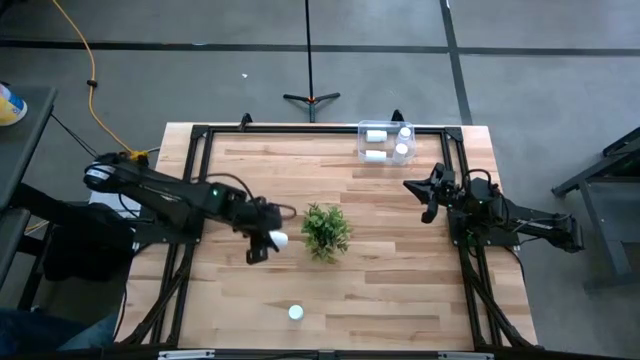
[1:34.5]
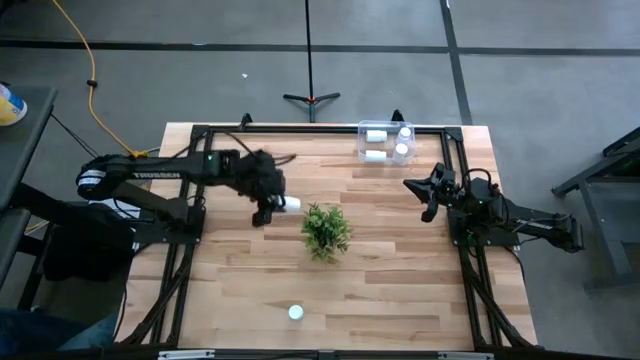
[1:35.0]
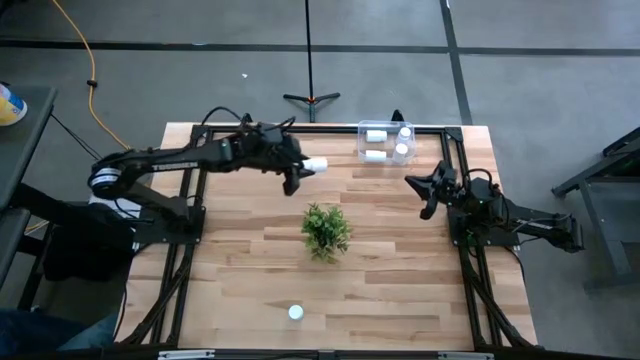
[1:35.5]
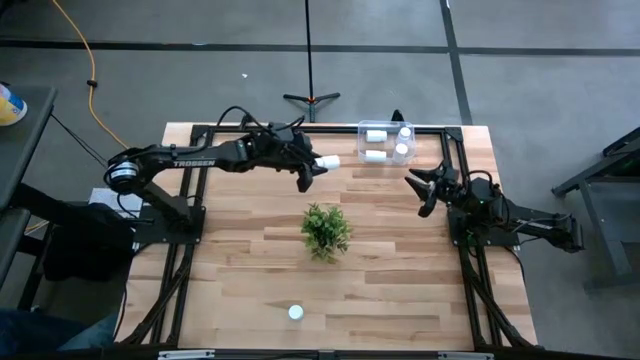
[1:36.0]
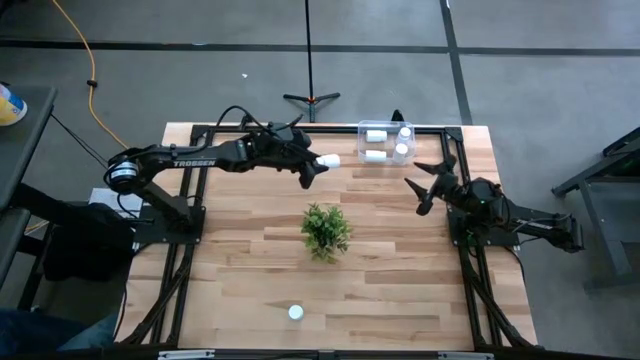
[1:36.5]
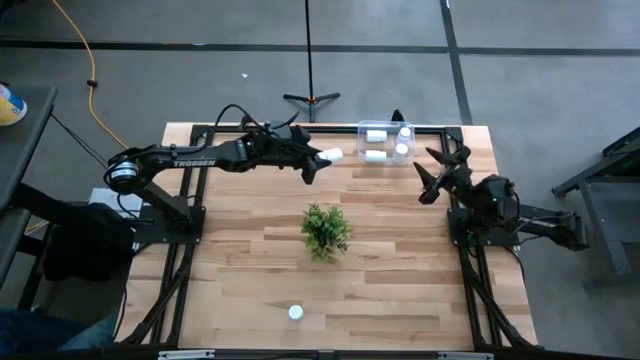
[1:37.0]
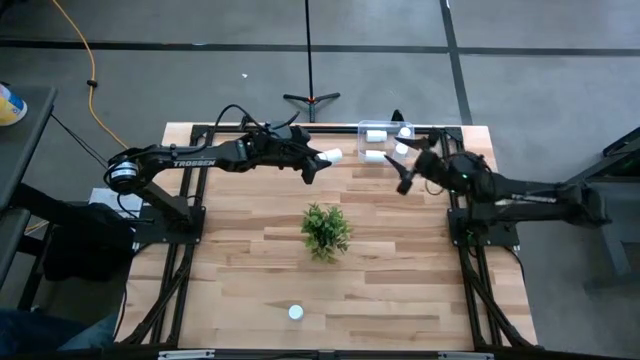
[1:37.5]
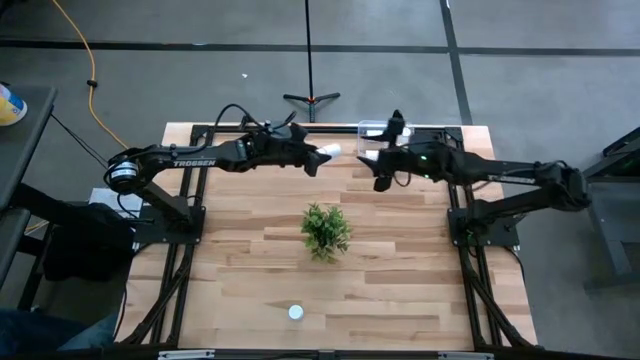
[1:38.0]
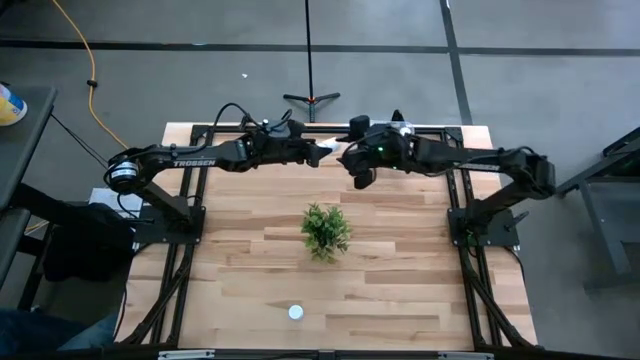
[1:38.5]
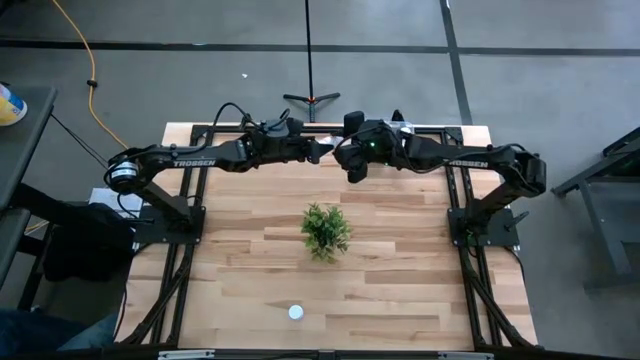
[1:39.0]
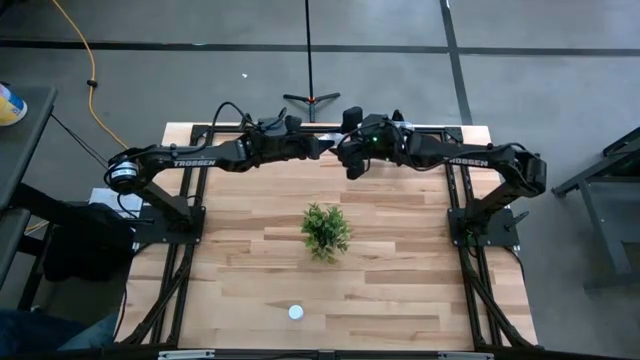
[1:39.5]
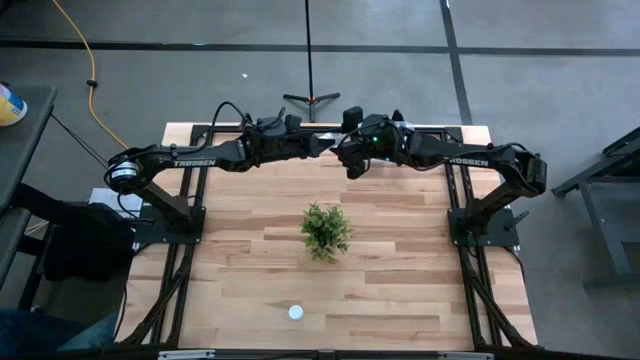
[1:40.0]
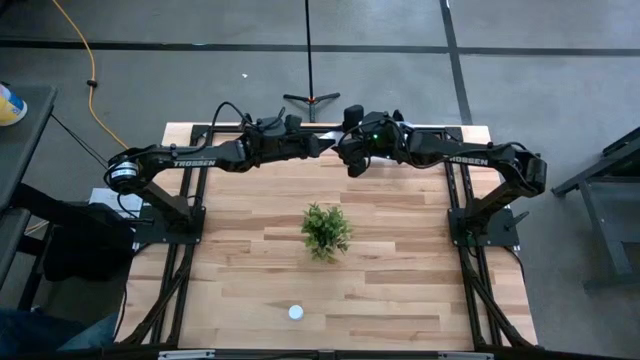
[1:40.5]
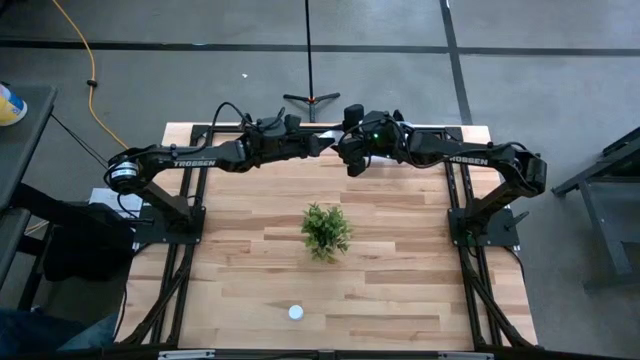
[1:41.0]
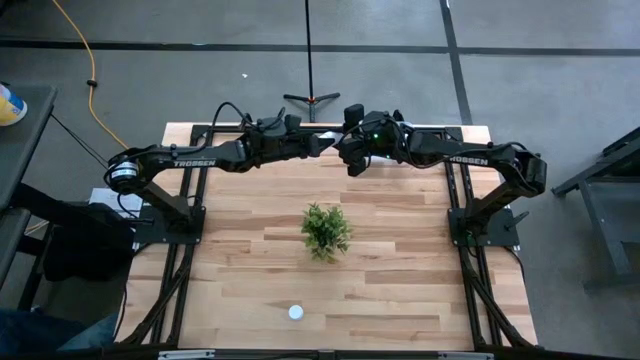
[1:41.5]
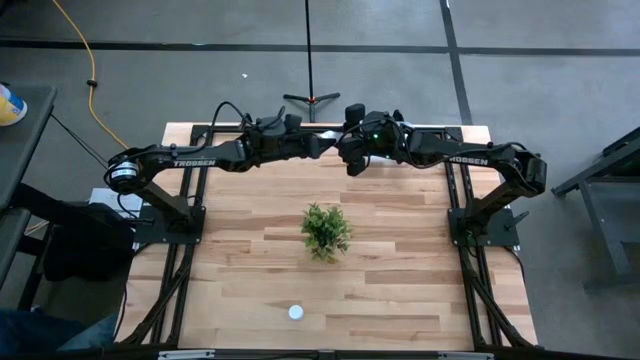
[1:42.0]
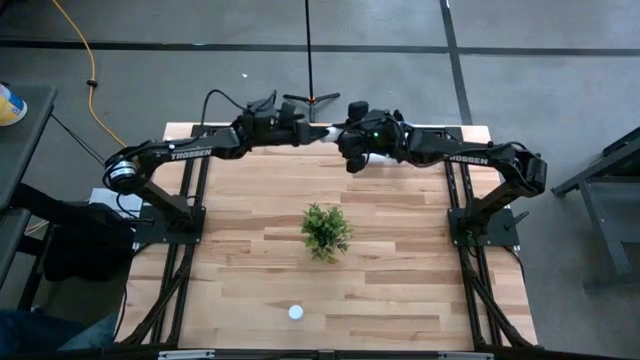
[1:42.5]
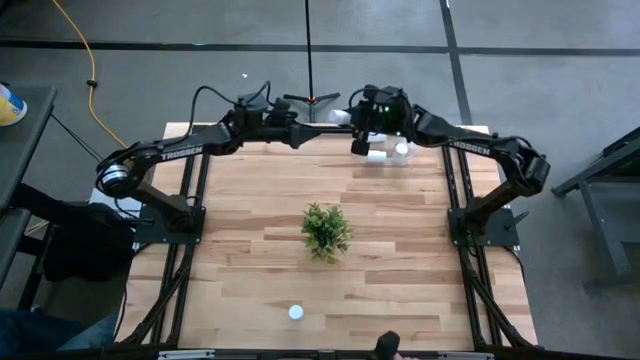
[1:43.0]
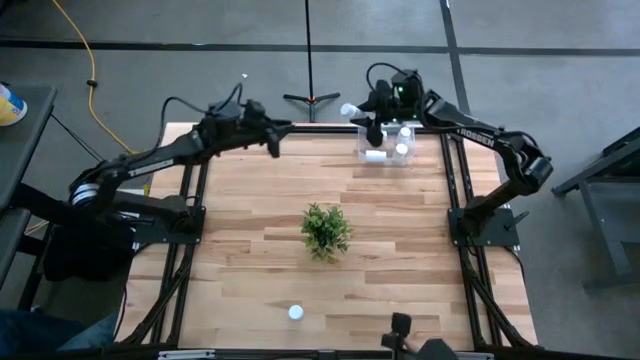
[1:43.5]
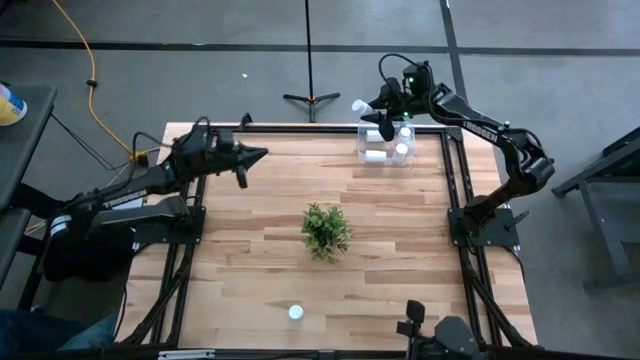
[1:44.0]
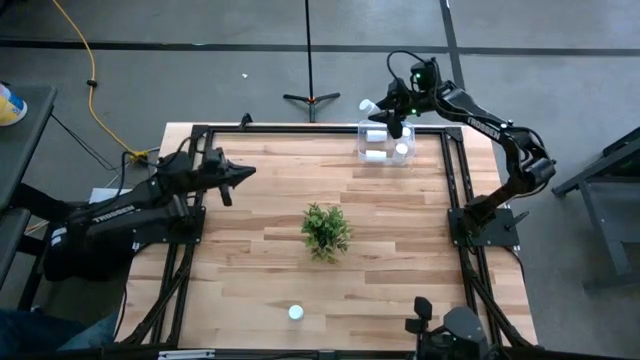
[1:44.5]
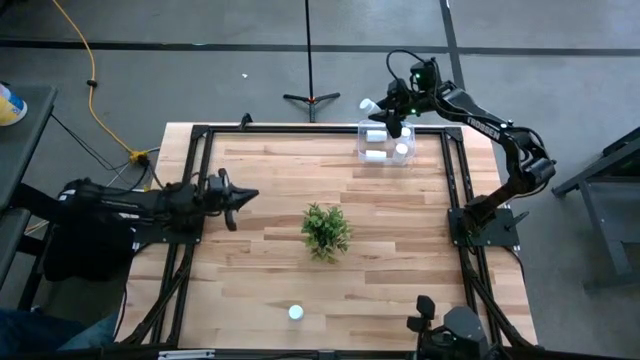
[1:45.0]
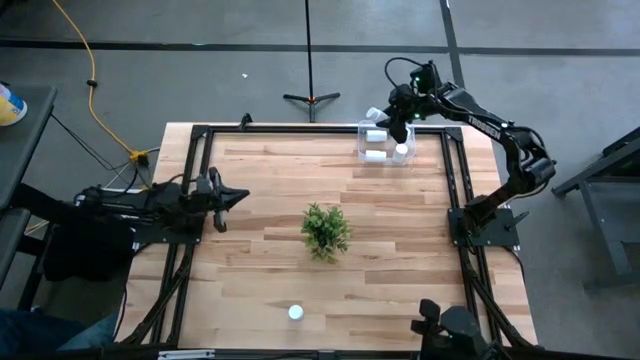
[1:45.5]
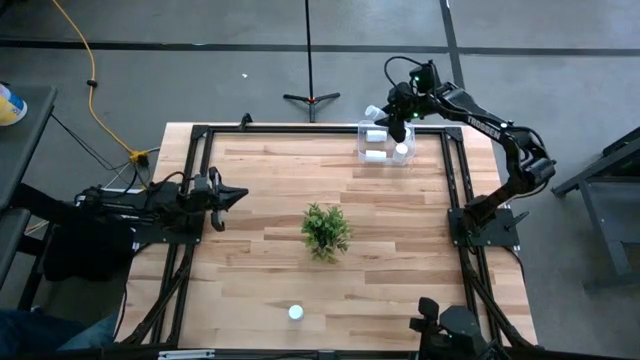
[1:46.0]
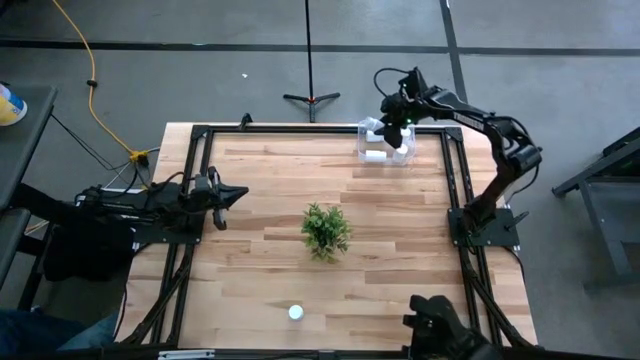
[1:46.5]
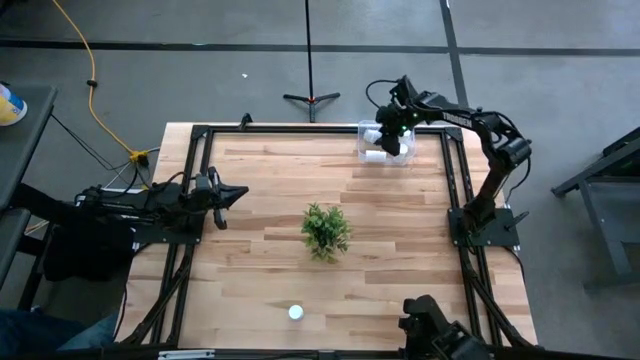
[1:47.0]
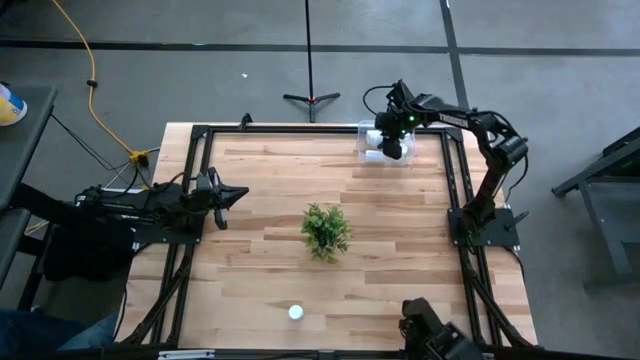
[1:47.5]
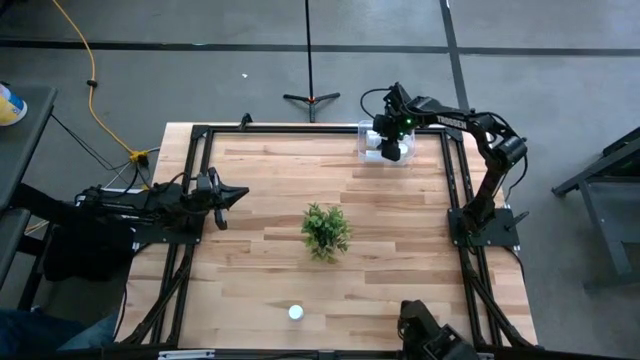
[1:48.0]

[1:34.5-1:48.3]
Task: Pick and place pill bottles into a basket
Put the left white pill bottle into the transparent bin

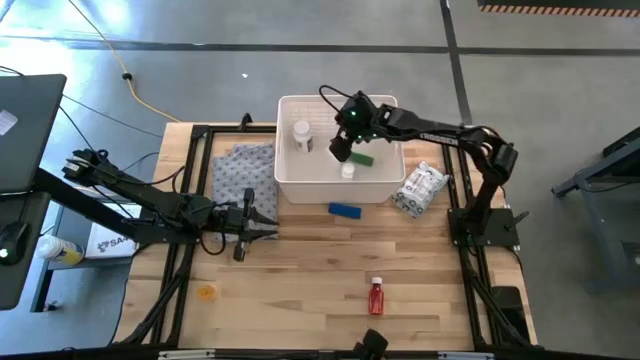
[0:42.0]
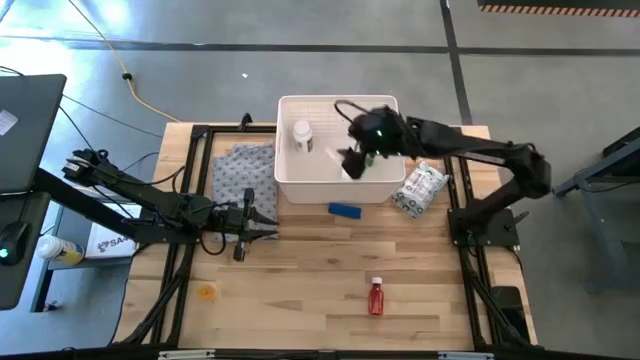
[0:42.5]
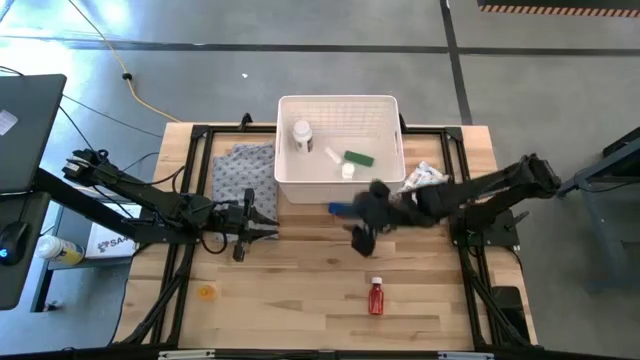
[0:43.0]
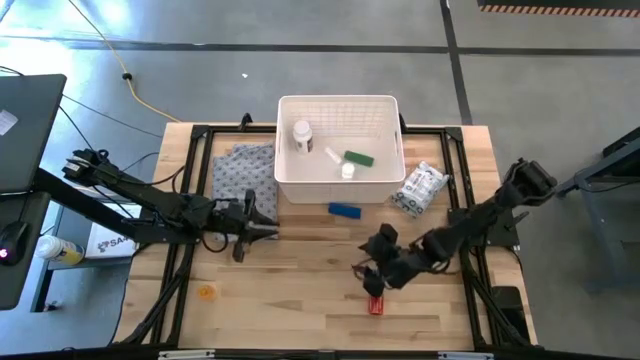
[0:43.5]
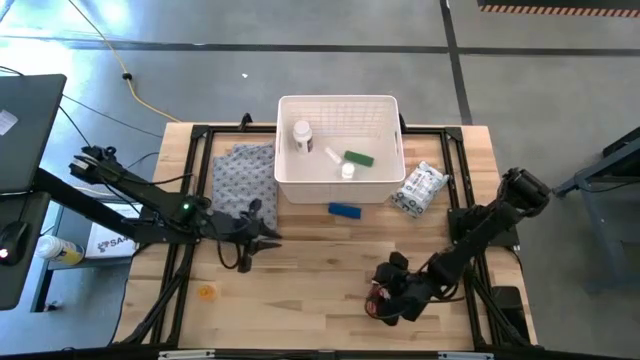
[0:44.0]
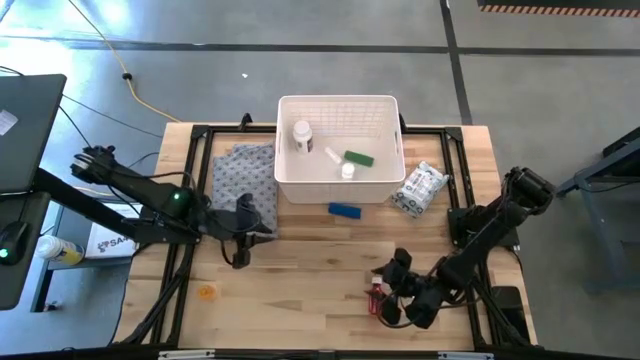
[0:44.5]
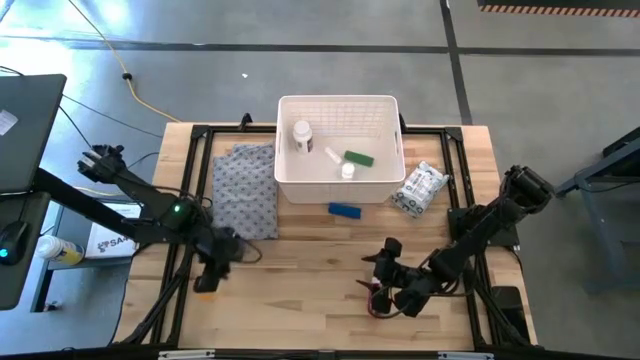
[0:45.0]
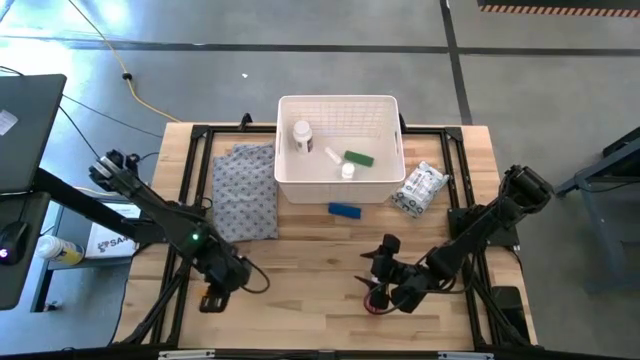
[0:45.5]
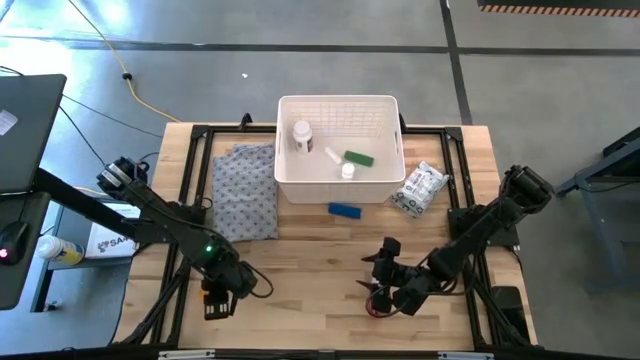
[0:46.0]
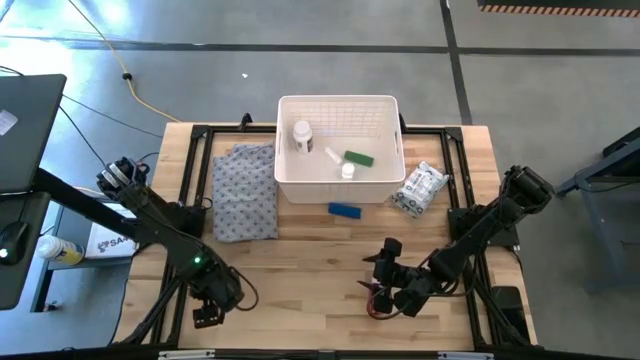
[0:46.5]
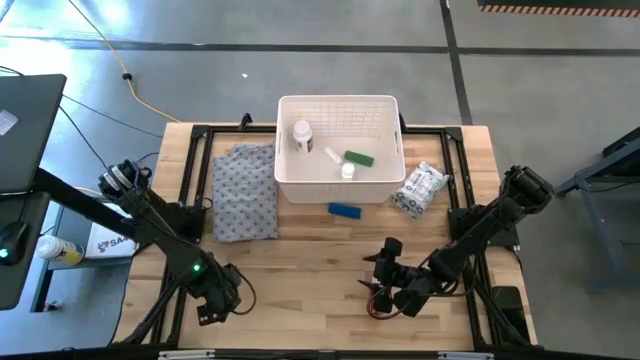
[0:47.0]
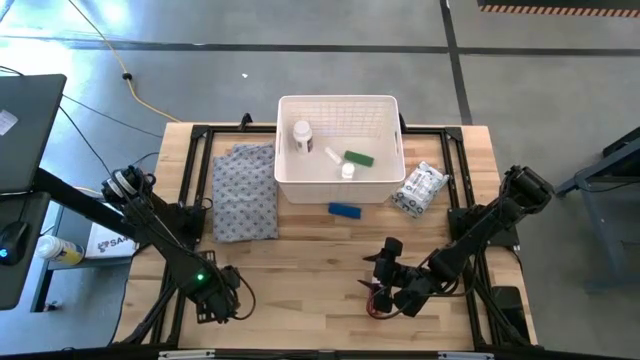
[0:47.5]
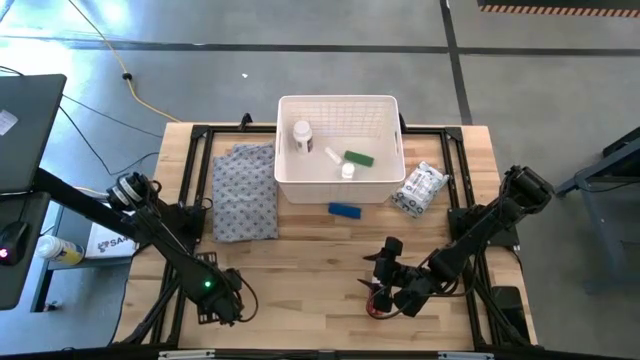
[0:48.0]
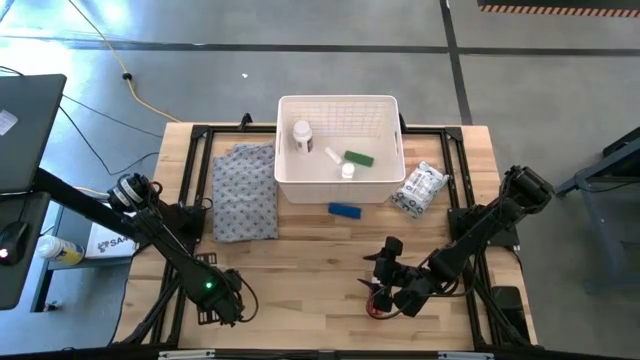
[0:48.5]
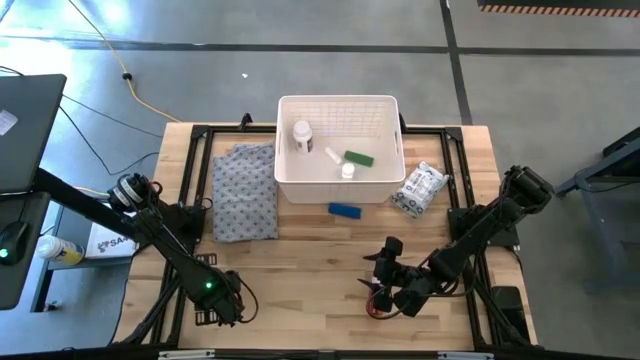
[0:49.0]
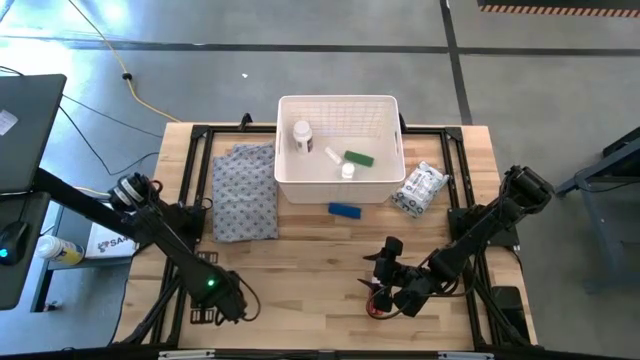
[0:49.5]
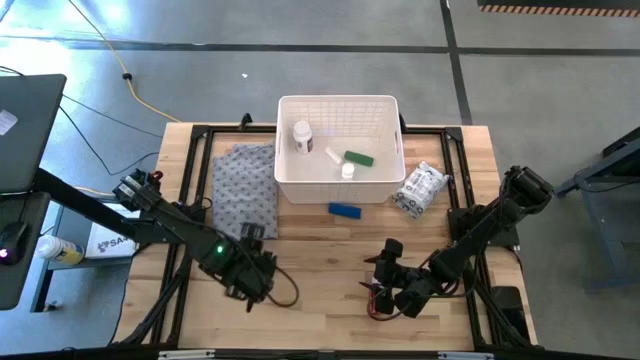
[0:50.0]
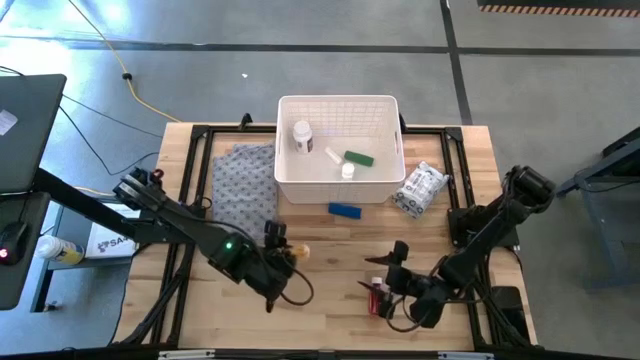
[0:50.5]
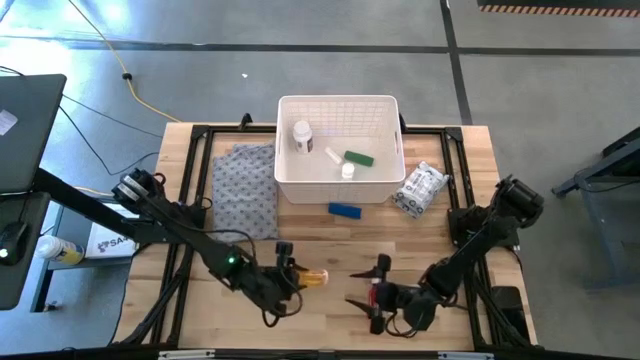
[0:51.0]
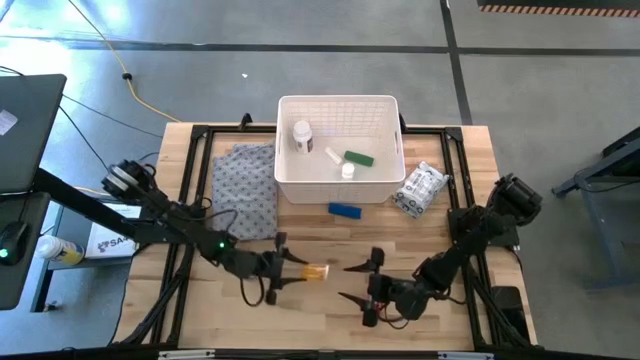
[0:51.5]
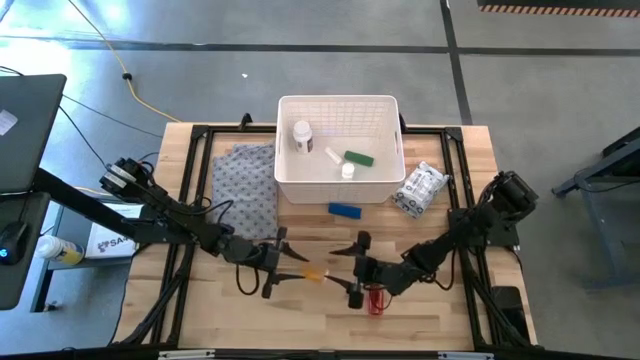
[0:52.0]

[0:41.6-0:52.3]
Task: Pick & place medical supplies in basket/bin
Put the light orange pill bottle into the white bin
